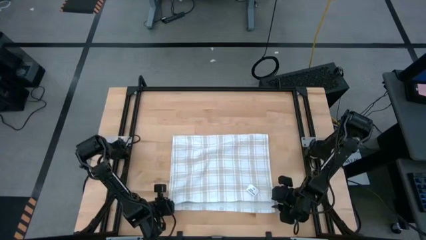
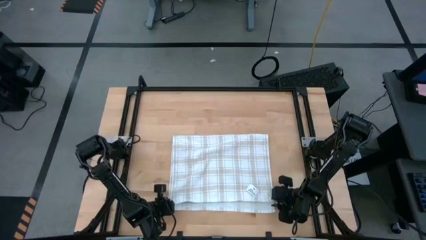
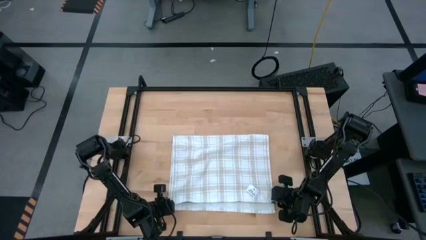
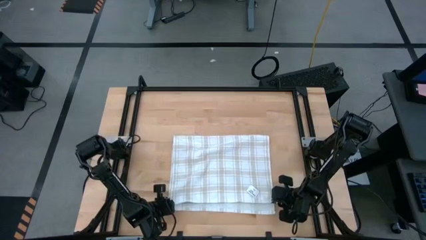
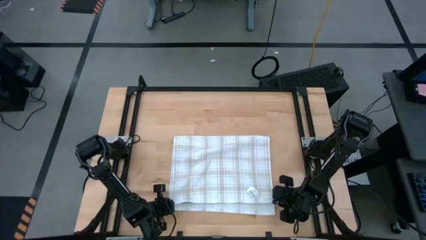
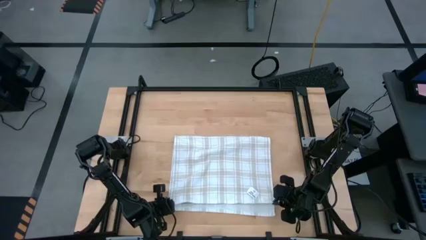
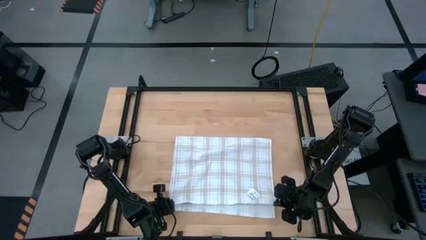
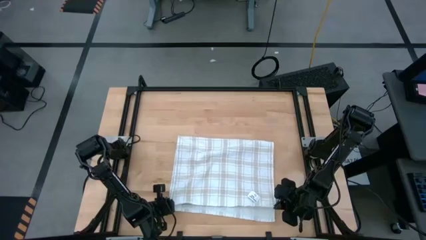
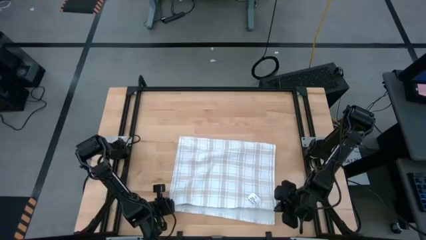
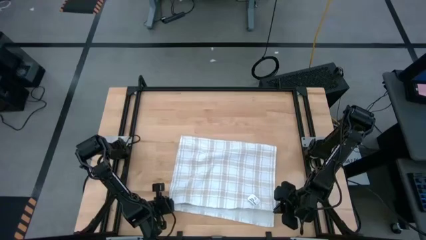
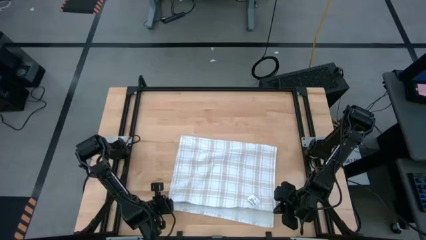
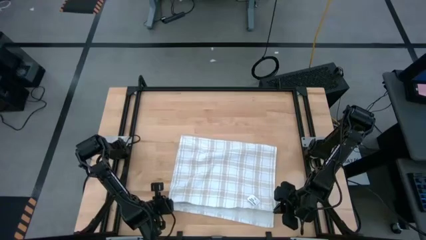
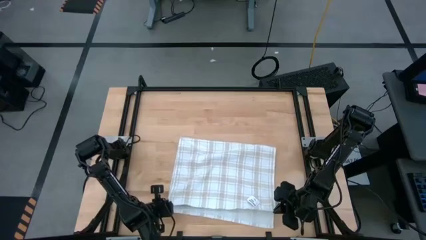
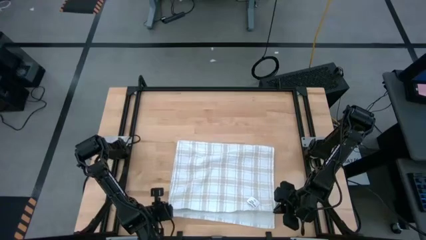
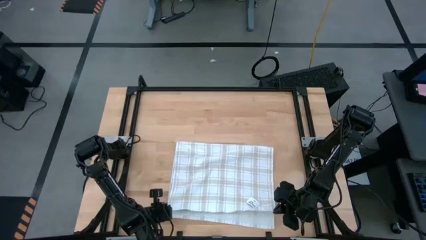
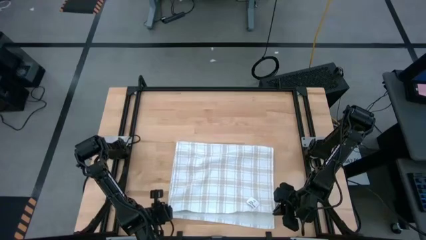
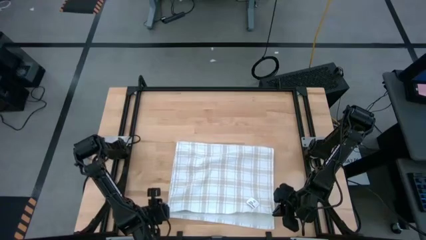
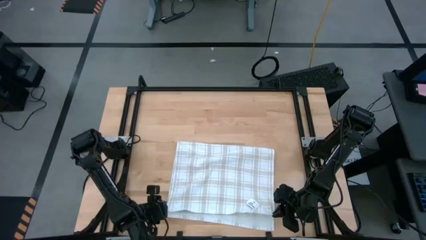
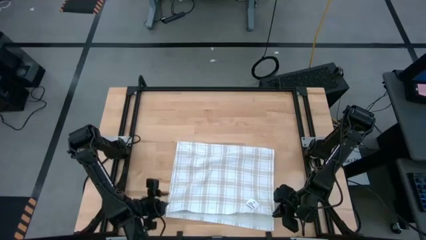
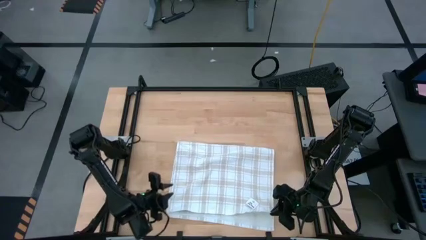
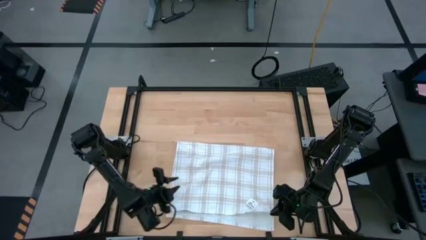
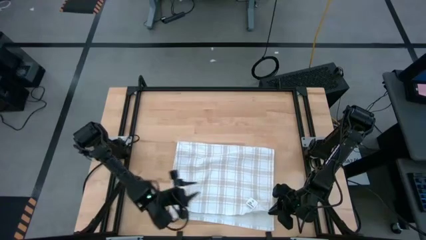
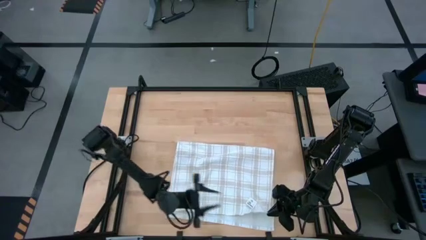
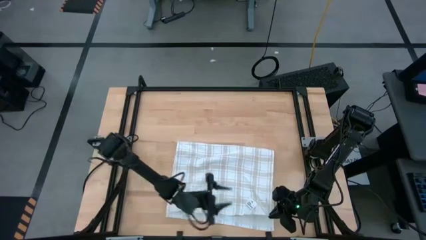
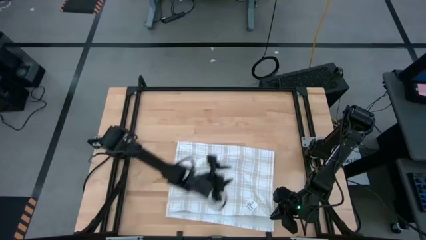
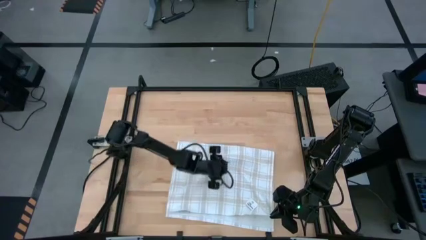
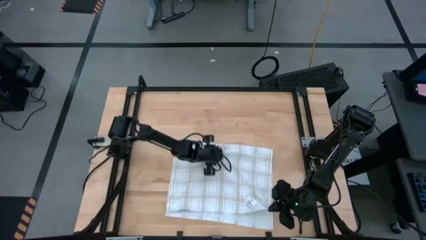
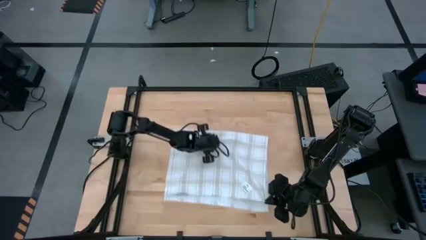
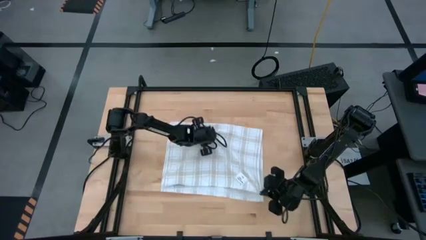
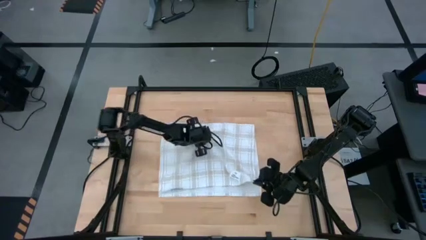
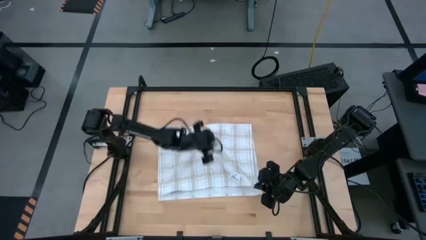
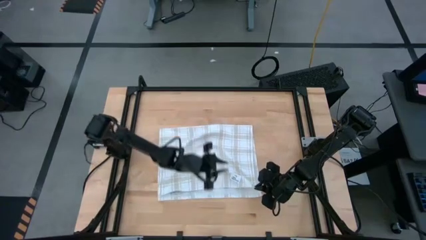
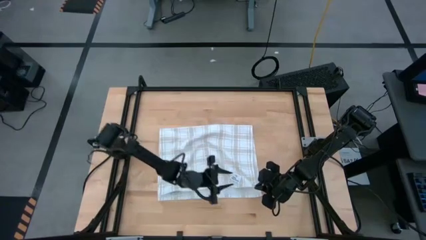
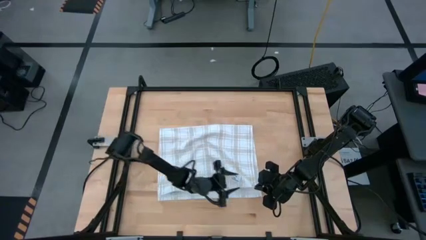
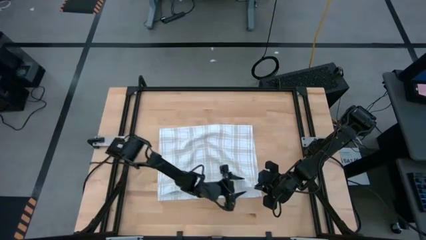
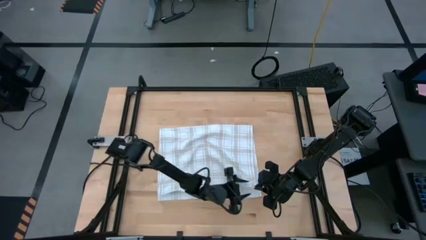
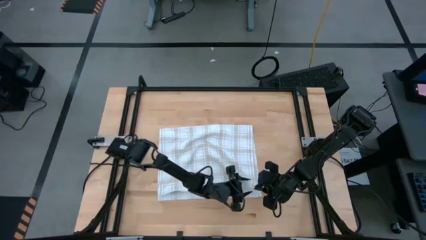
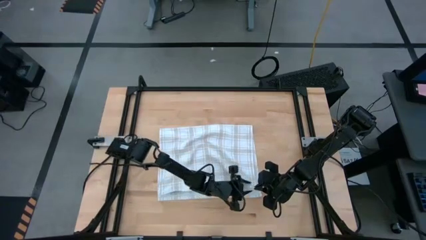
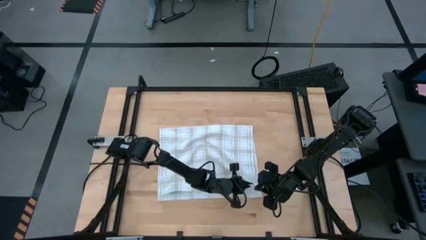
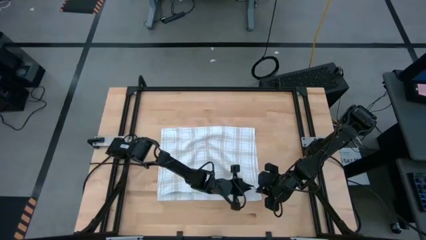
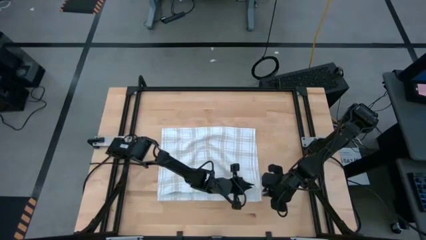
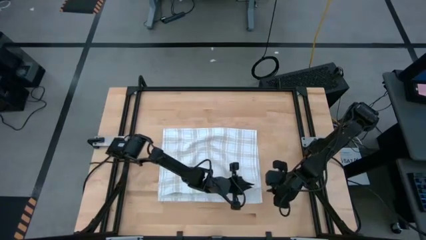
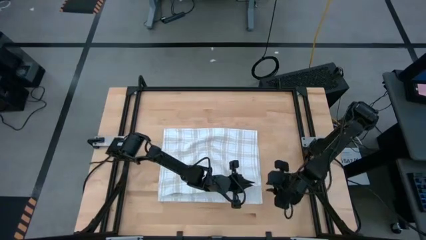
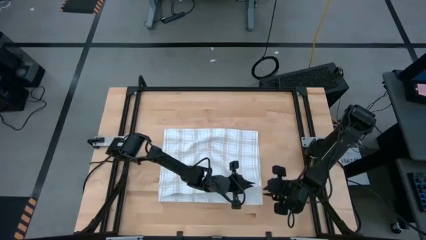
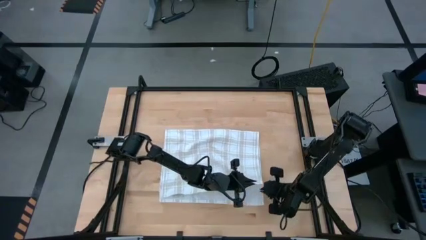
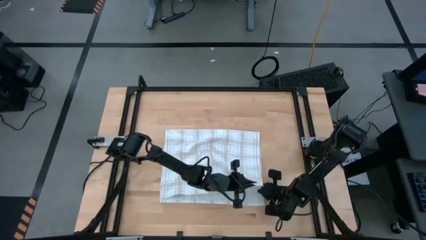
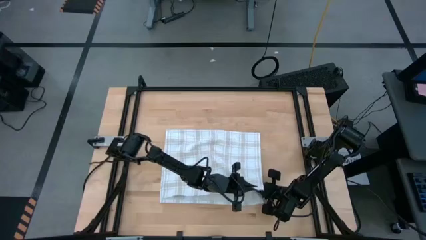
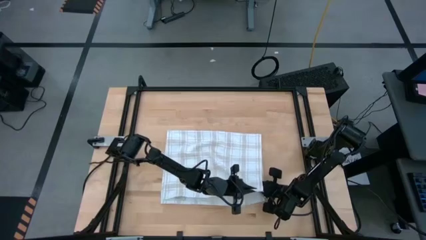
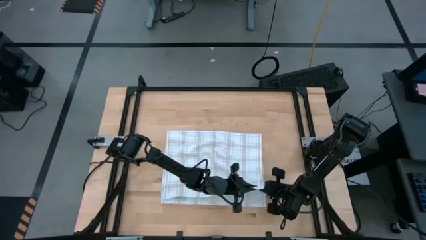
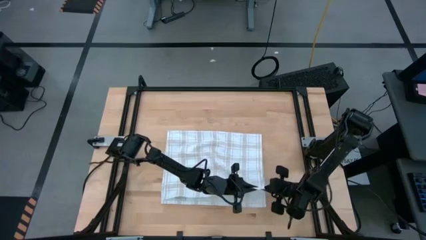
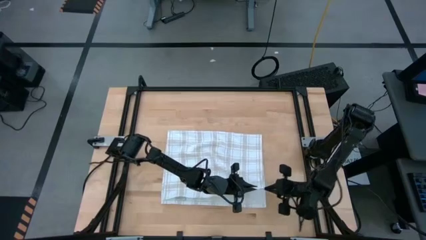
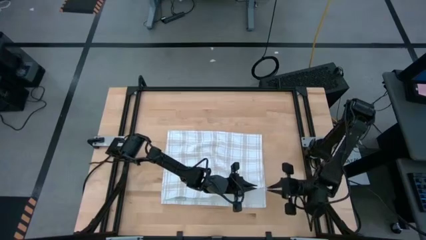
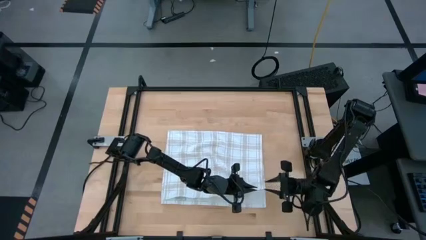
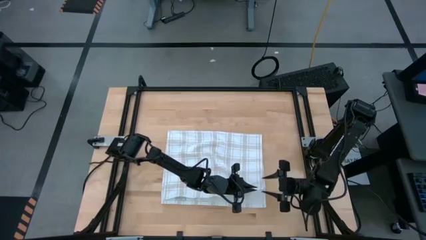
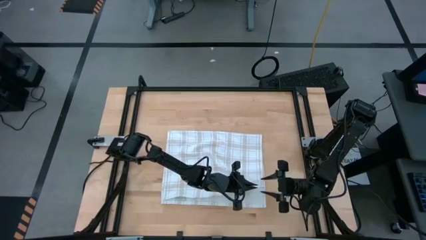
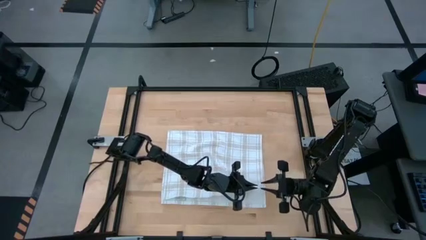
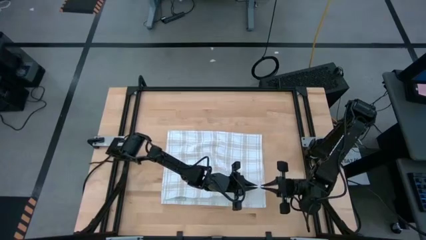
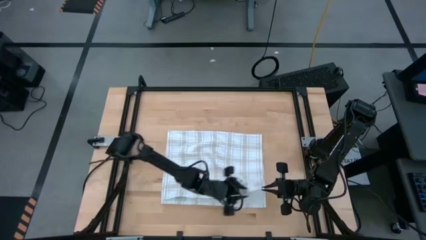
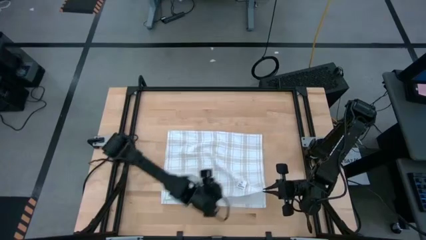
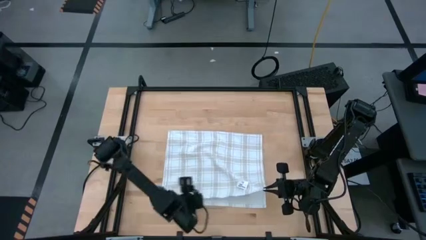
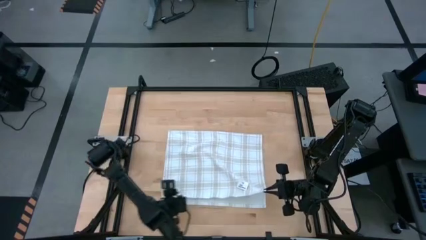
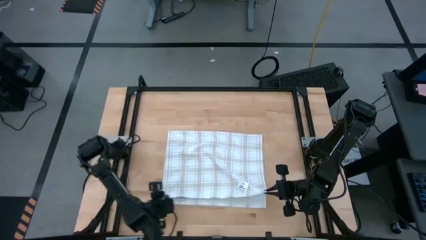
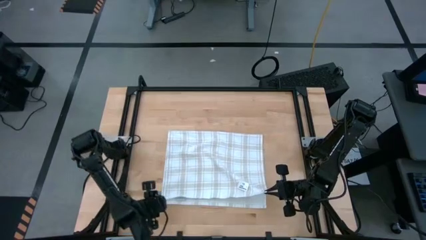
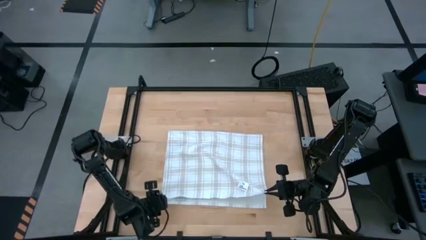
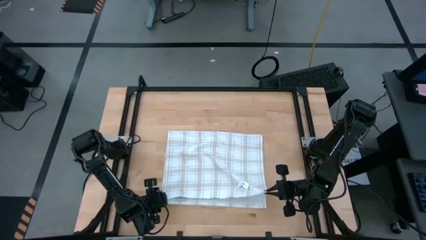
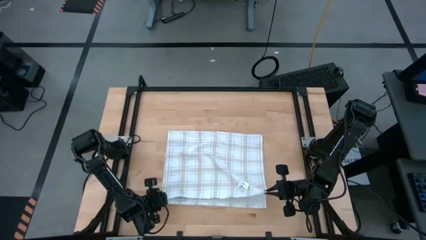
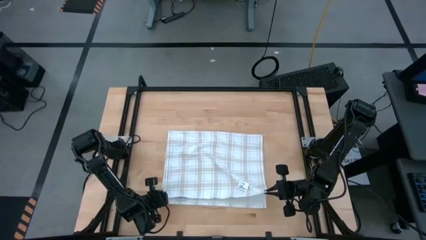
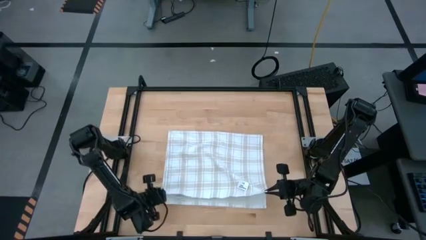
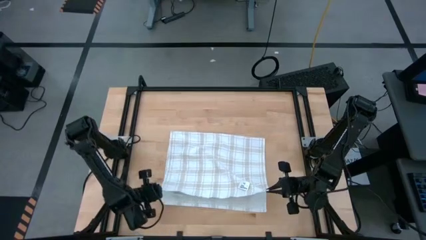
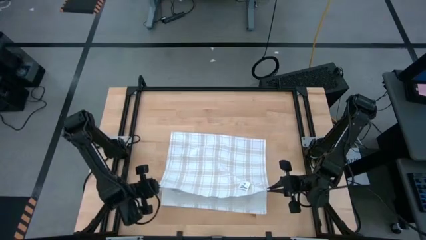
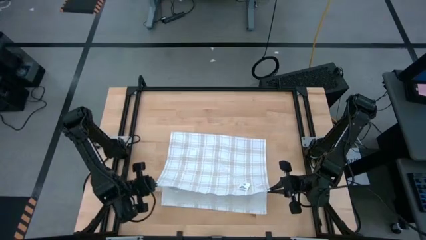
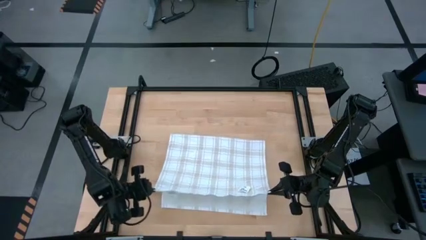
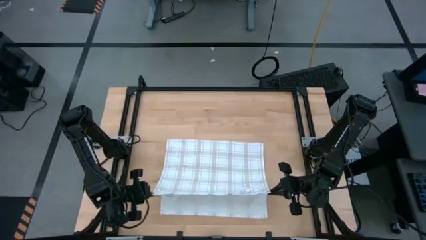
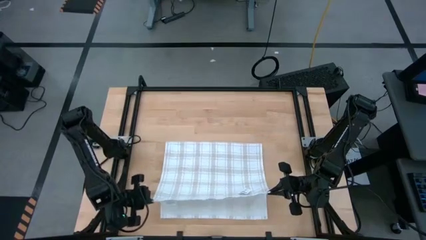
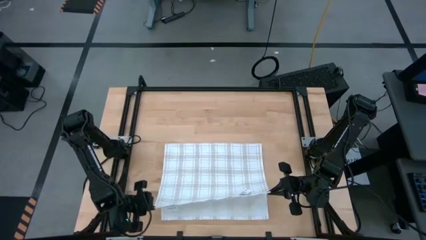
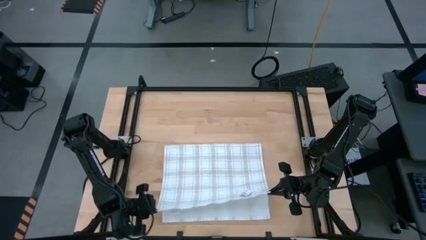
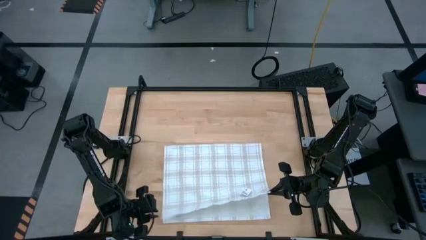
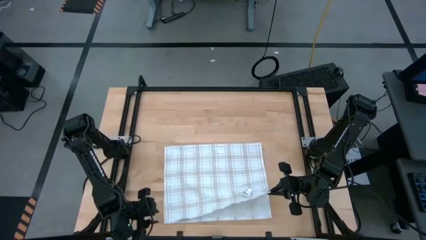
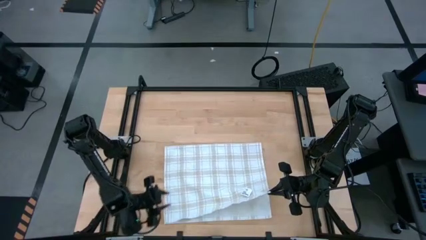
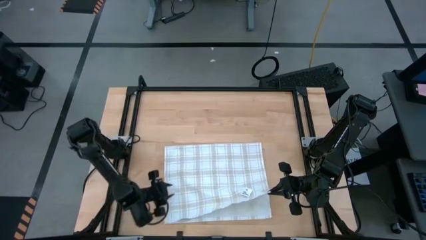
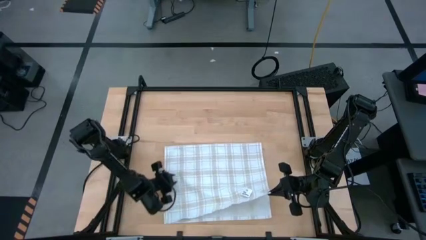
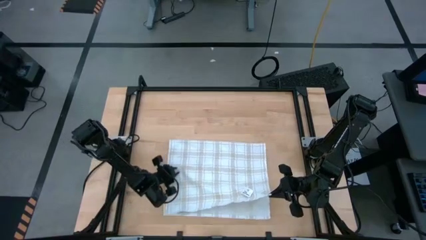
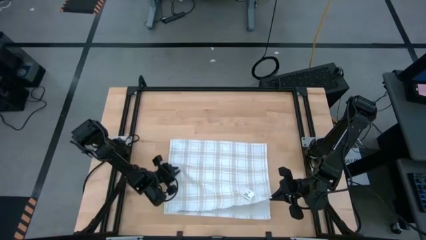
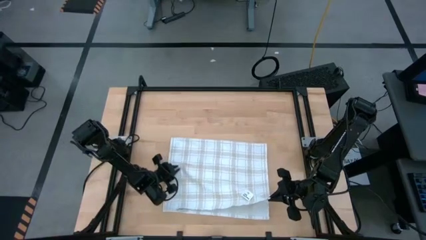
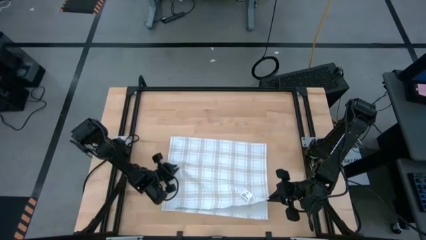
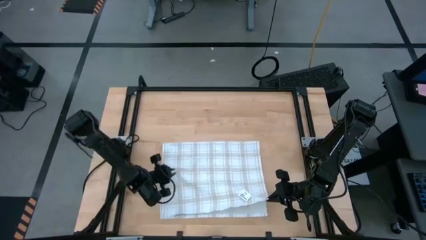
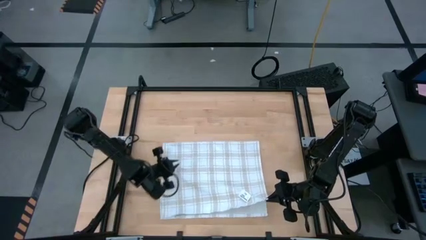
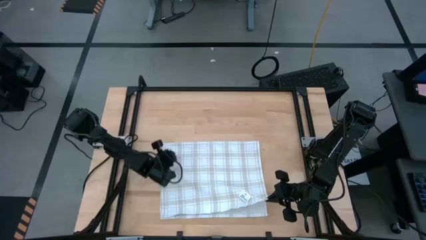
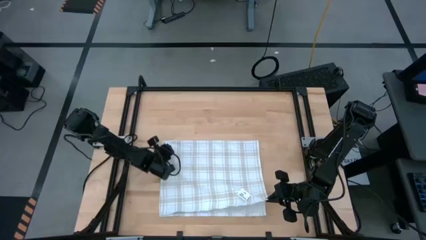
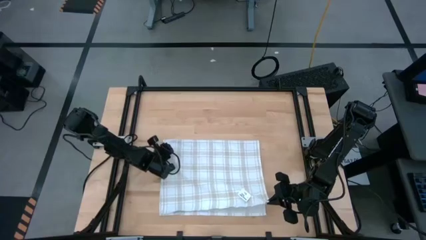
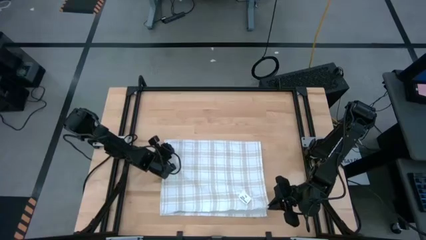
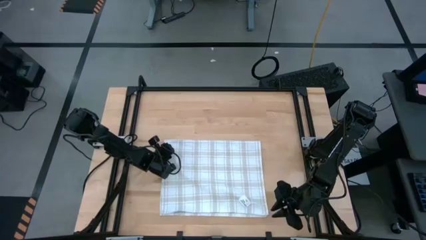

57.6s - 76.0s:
Task: Roll towel
Roll the white towel
